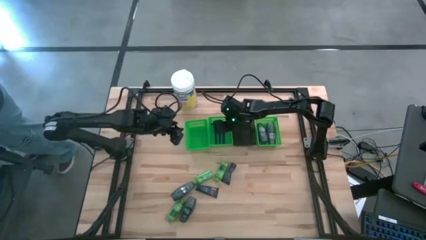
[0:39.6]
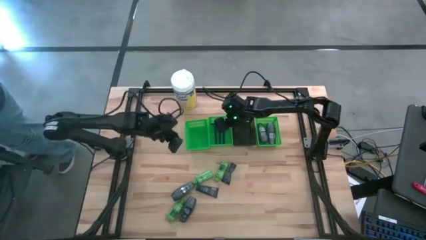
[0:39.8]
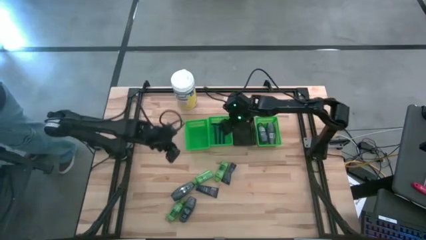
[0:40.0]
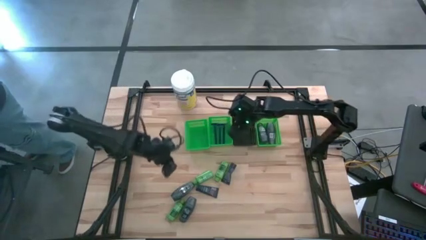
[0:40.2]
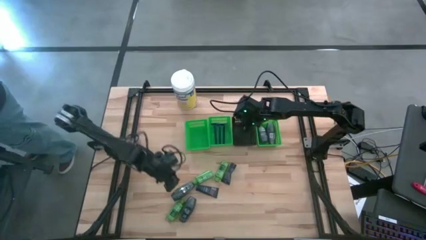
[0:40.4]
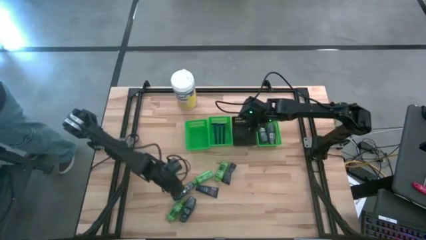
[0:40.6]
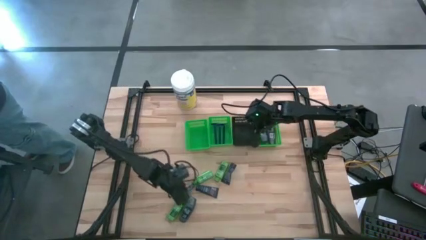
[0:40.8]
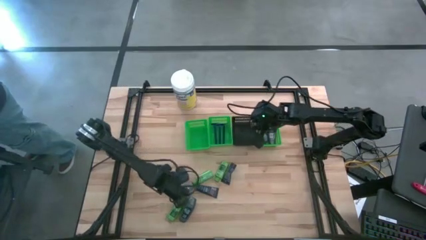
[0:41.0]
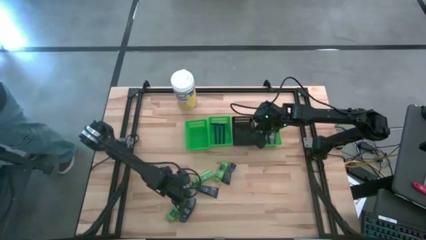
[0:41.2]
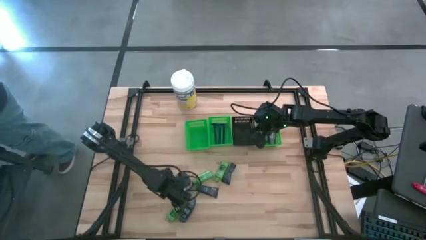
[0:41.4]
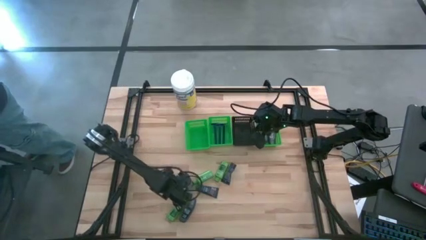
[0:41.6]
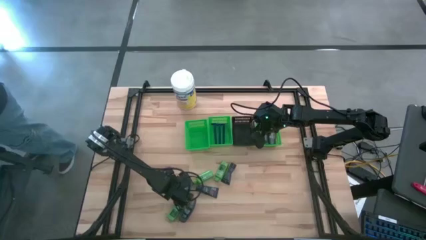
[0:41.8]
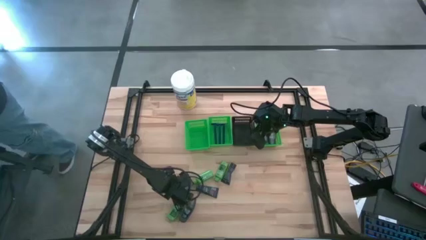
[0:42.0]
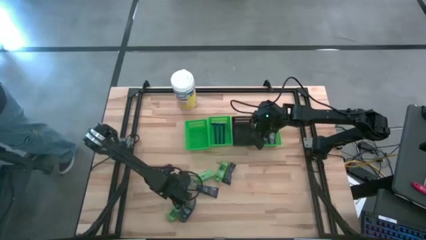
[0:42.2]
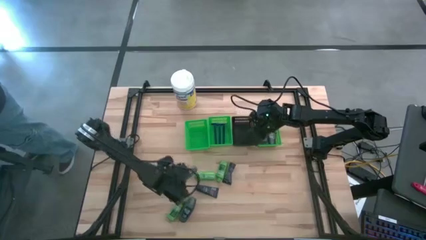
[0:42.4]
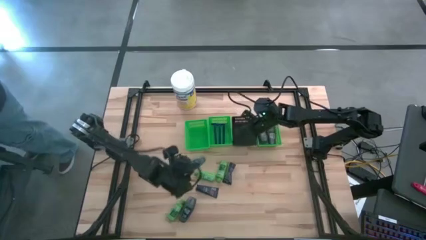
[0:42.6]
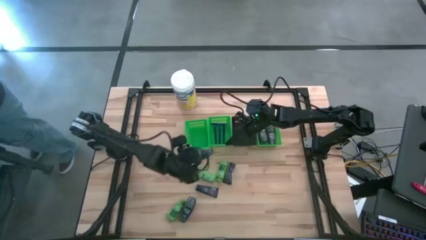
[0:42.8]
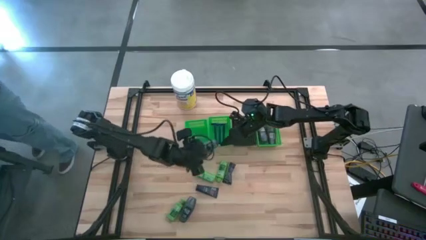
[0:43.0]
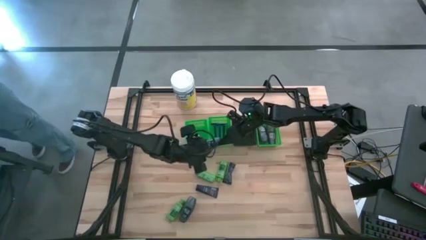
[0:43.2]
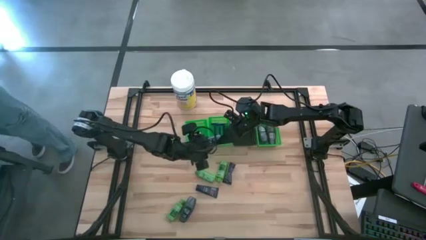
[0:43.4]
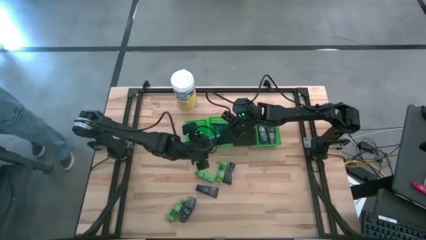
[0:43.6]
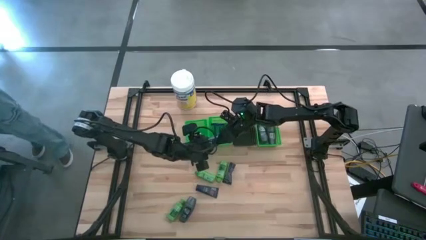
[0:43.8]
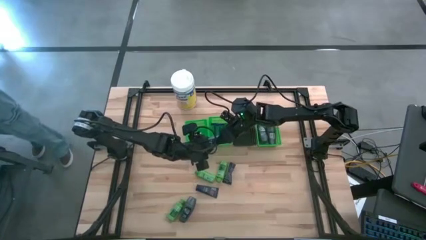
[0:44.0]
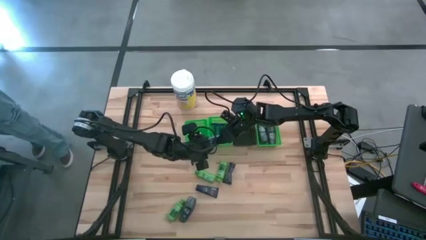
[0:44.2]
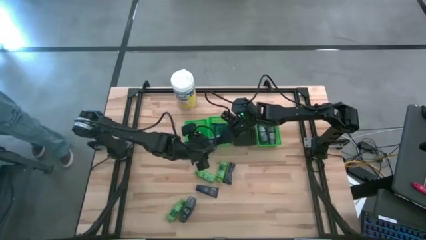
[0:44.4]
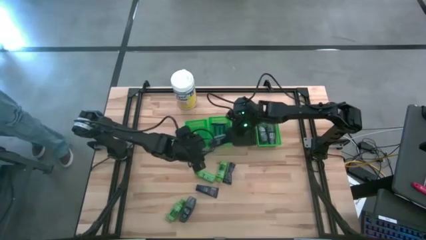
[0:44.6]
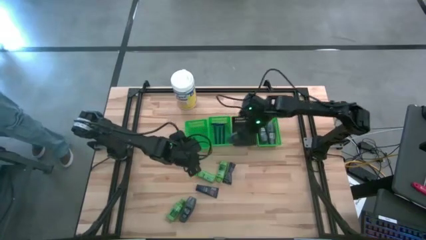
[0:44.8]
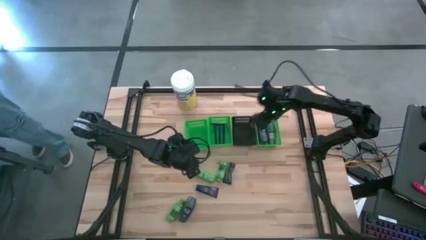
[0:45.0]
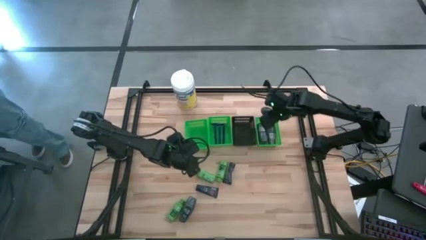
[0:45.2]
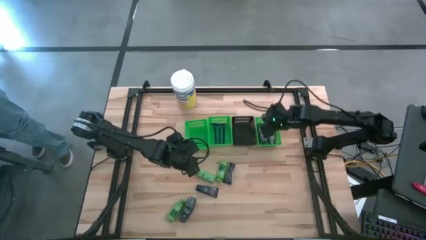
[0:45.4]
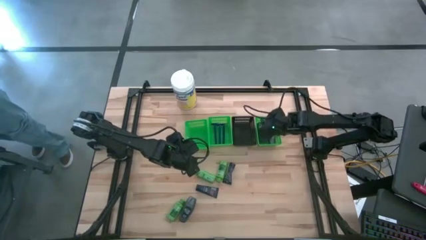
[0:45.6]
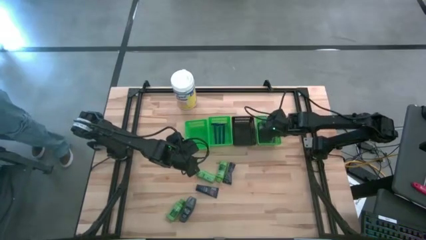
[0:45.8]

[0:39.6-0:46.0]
Task: Pick & Place Travel size toiletries
Put the top deodorant into the right green bin

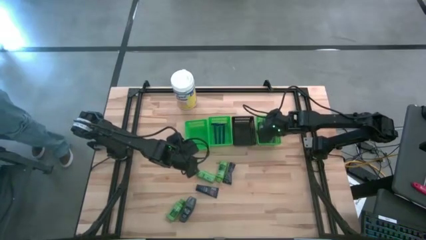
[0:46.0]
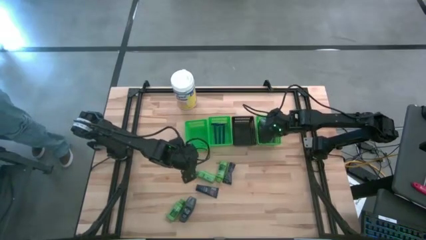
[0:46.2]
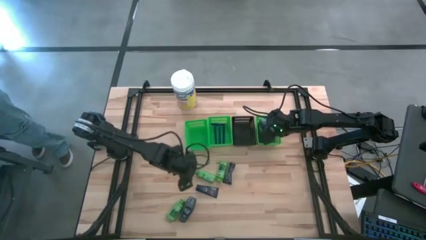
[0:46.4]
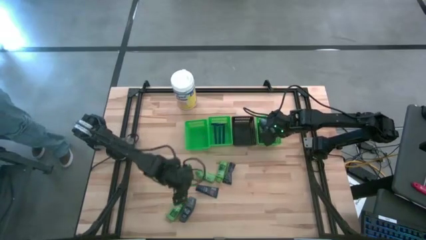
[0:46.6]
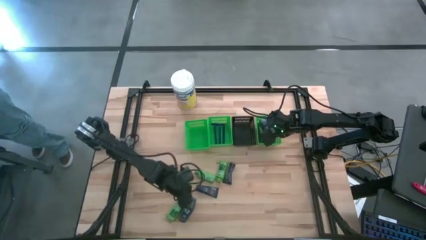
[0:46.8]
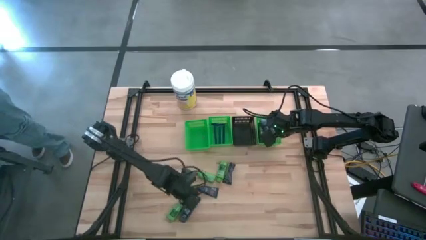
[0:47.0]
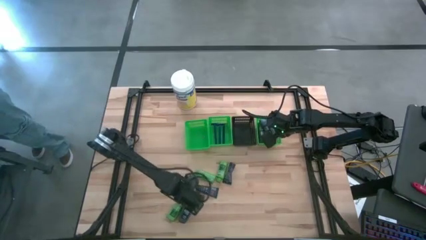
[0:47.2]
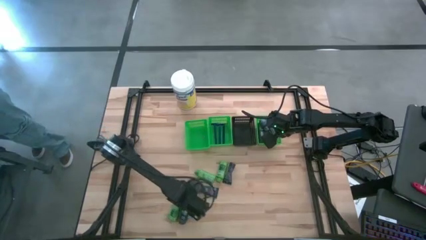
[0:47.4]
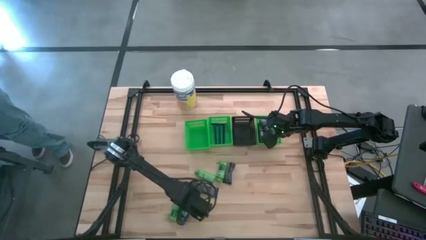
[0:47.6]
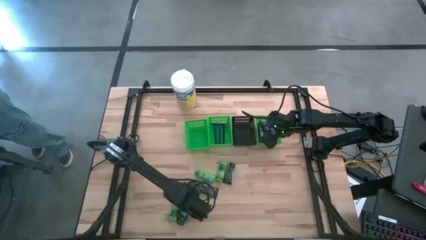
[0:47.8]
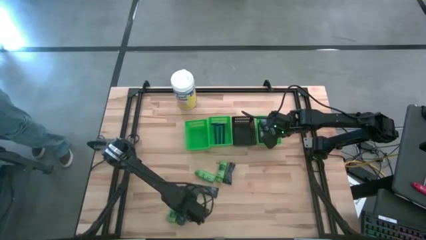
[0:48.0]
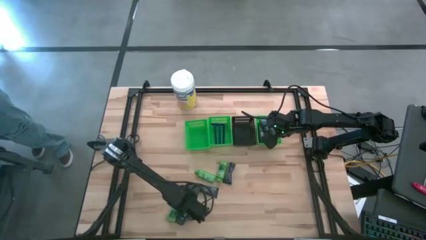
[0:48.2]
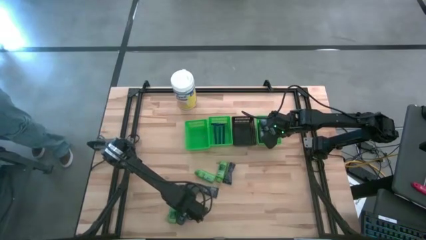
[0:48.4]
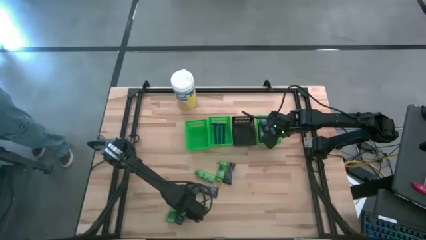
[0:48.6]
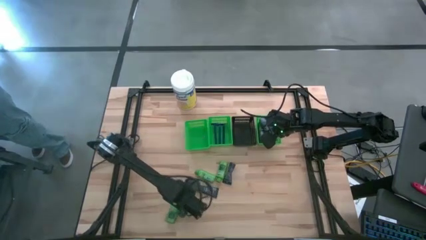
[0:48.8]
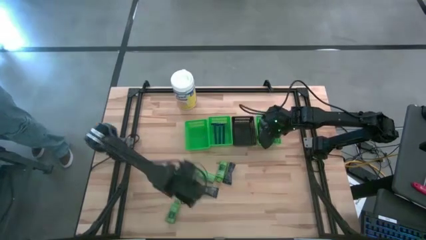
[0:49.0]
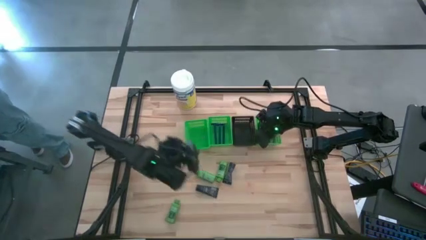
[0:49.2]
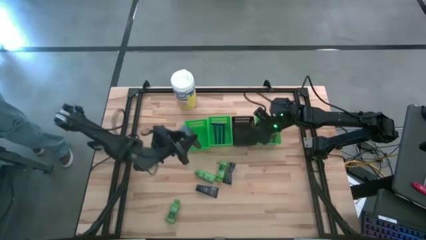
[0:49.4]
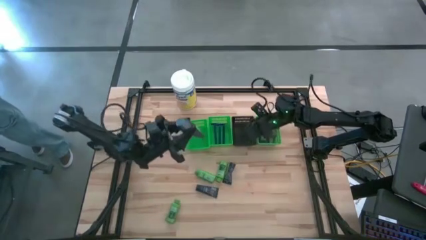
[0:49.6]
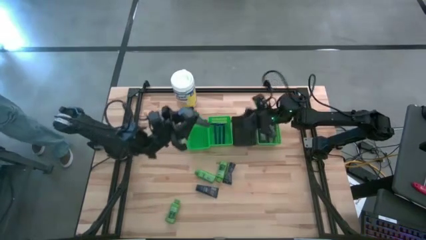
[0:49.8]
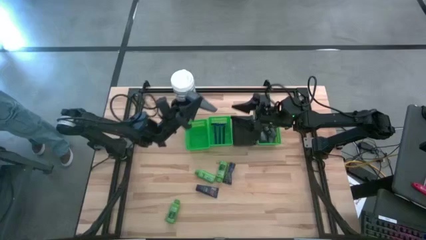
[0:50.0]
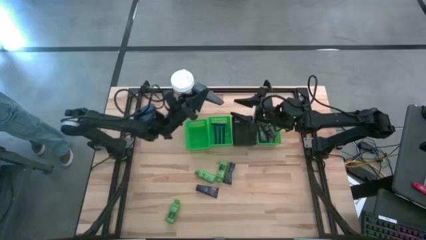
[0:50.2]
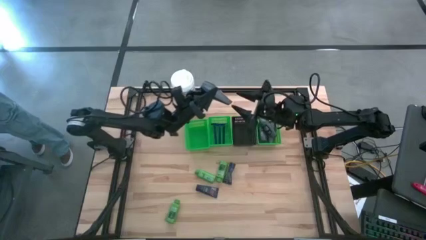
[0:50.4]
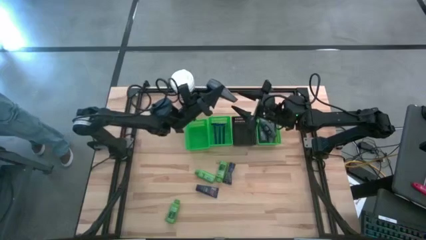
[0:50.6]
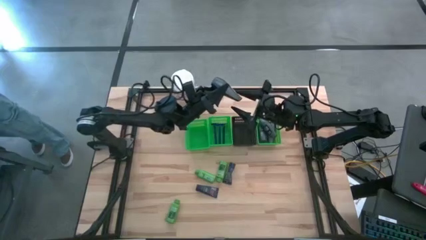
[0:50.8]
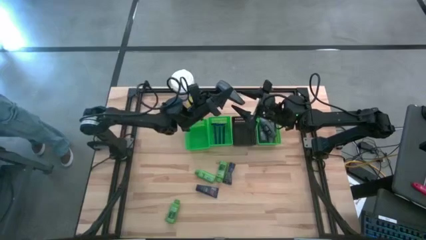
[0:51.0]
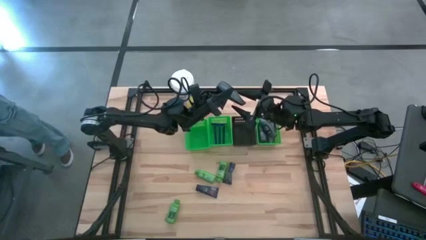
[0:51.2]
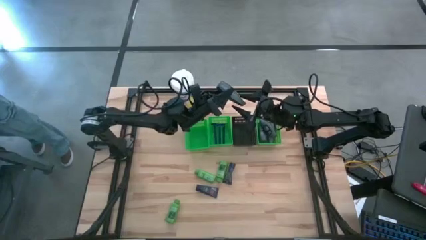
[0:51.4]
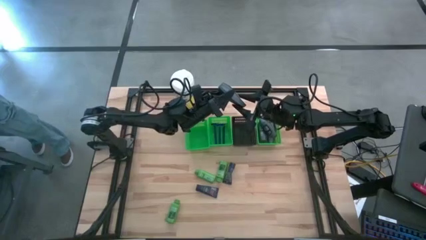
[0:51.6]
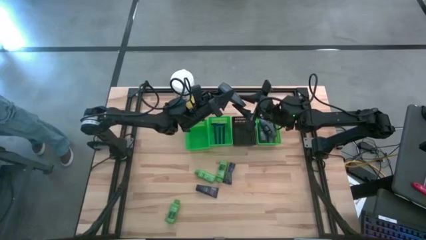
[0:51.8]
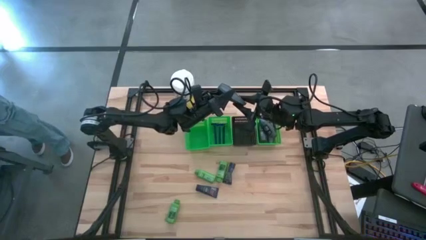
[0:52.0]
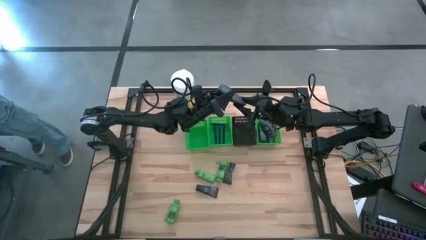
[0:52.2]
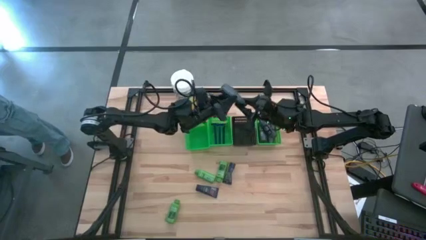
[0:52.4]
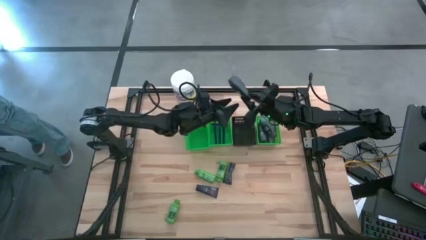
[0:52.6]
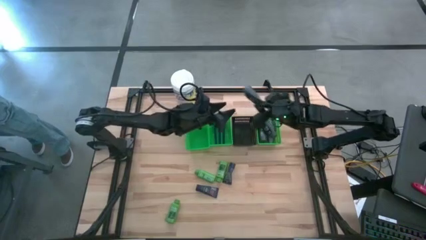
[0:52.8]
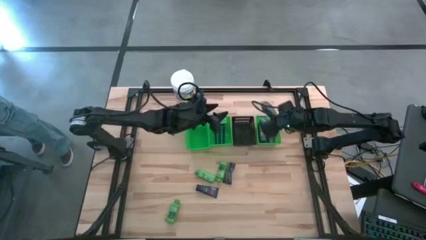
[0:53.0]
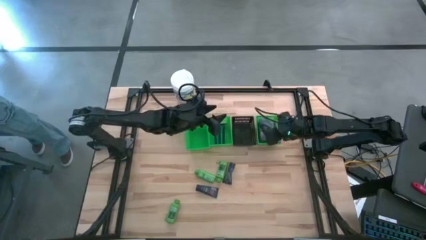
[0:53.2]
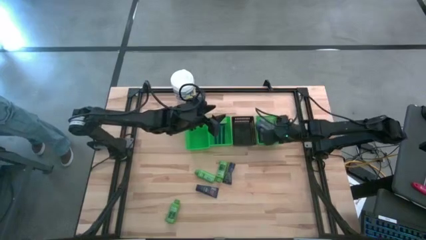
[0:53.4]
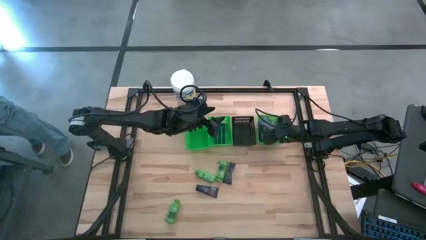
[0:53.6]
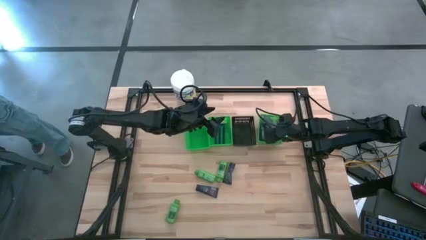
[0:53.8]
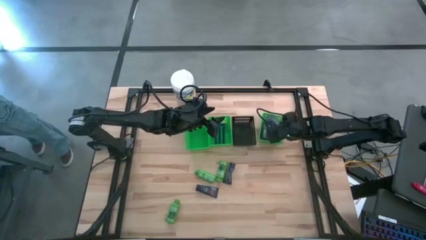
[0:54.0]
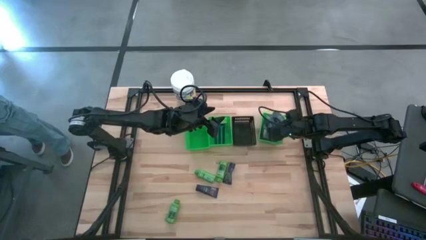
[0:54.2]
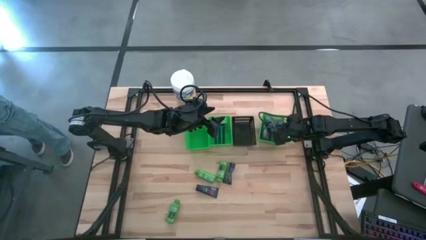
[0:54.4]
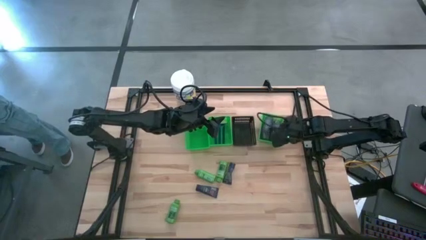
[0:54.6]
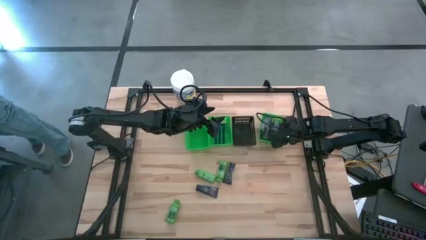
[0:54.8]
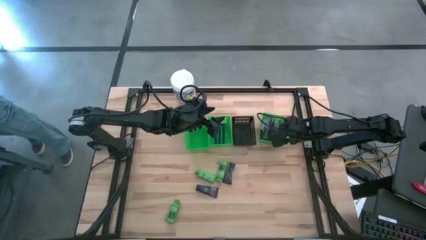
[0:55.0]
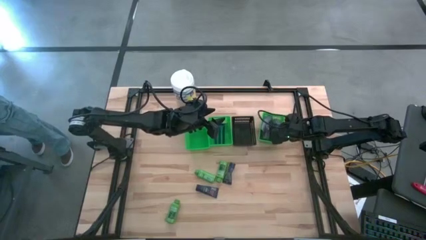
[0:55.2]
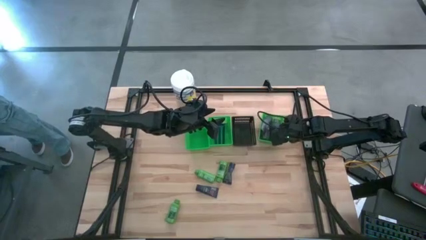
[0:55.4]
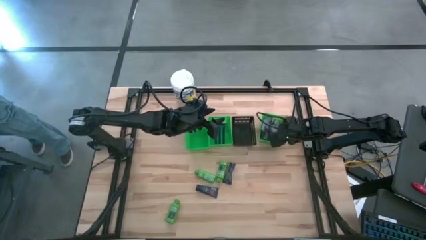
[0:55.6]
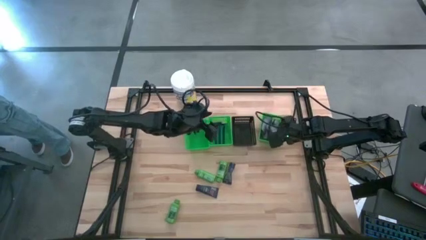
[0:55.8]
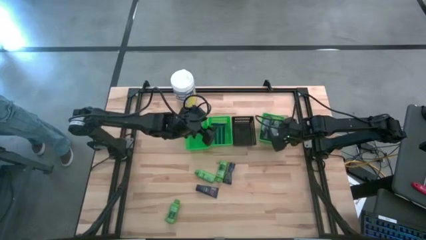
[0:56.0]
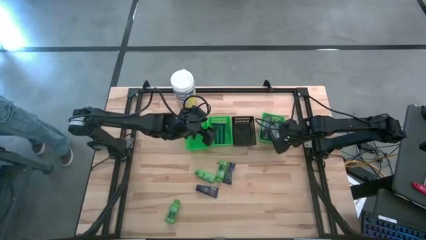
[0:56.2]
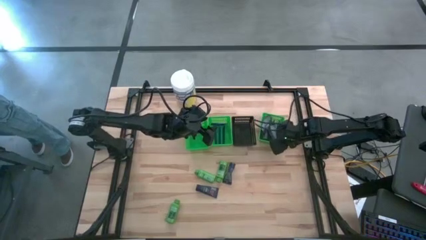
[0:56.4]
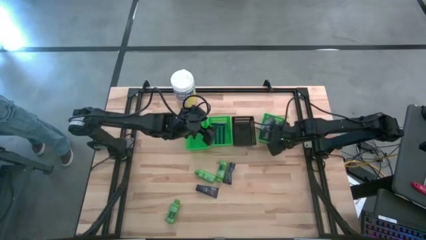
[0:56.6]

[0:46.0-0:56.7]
Put the deodorant into the right green bin
